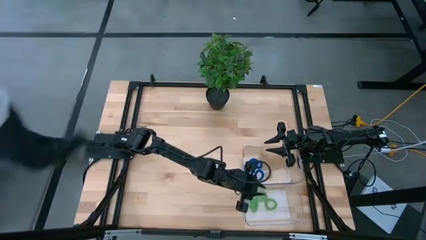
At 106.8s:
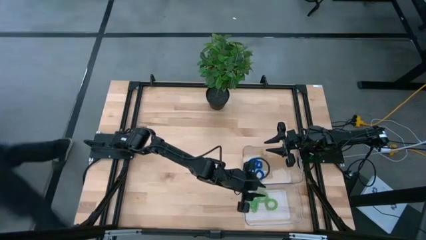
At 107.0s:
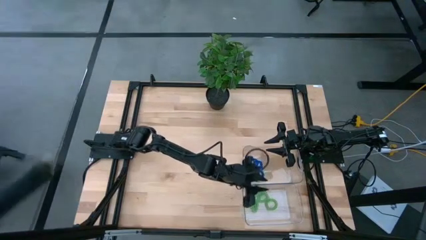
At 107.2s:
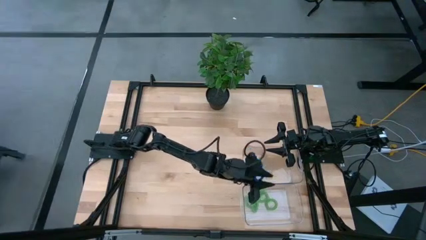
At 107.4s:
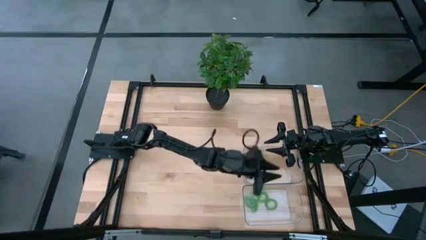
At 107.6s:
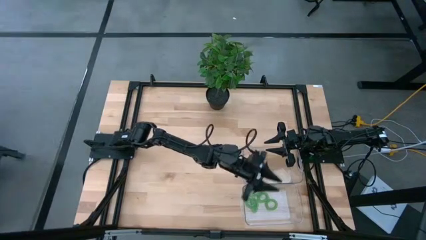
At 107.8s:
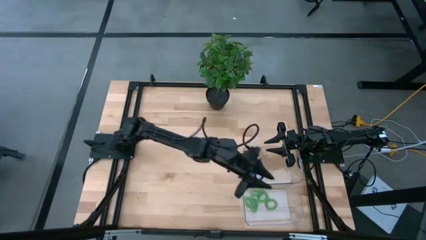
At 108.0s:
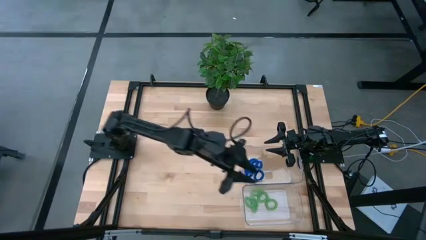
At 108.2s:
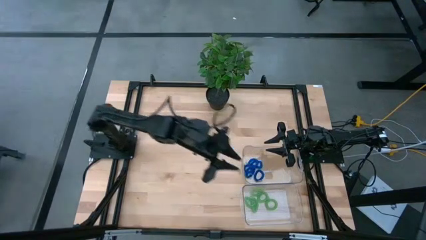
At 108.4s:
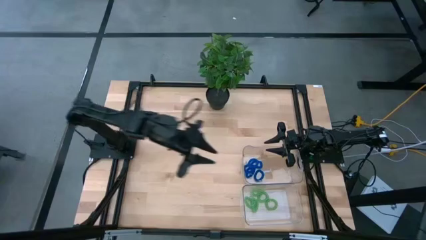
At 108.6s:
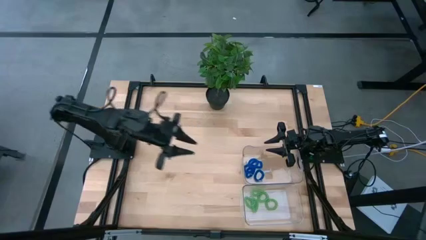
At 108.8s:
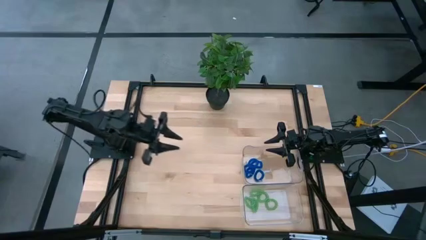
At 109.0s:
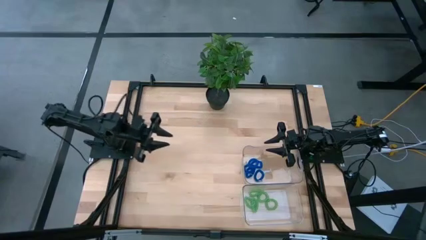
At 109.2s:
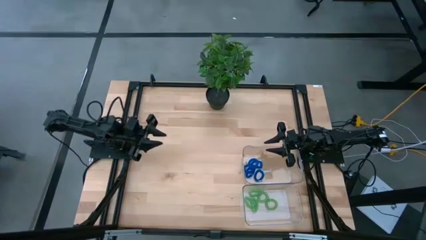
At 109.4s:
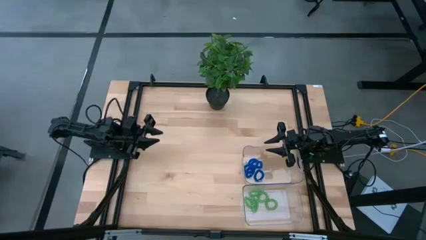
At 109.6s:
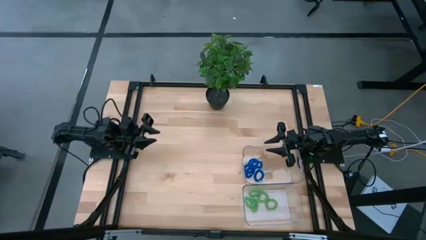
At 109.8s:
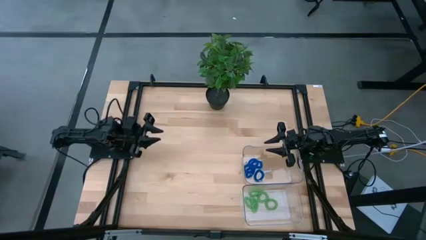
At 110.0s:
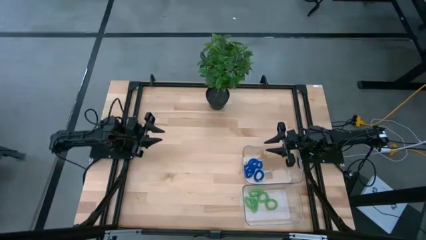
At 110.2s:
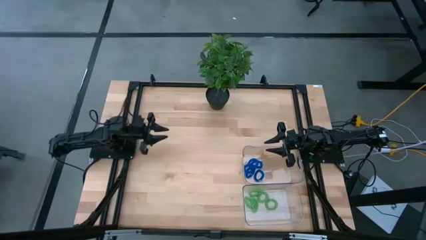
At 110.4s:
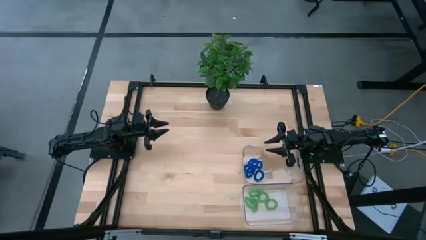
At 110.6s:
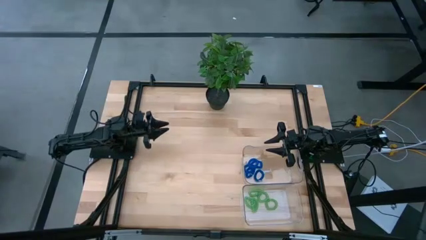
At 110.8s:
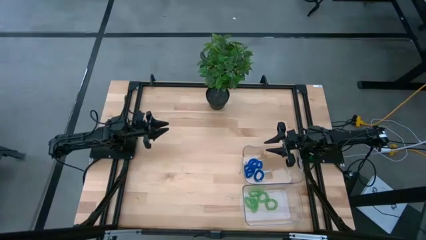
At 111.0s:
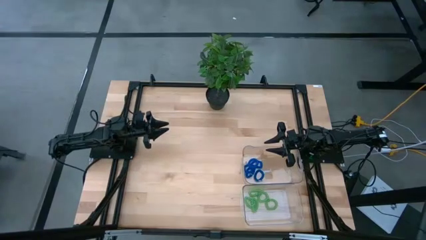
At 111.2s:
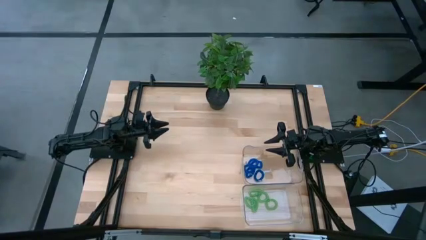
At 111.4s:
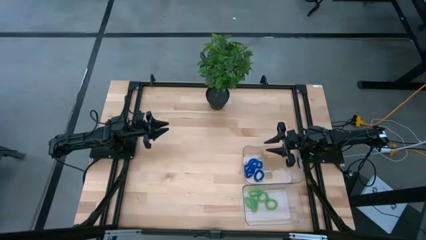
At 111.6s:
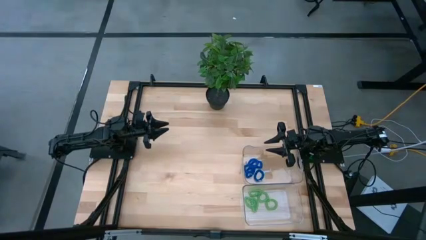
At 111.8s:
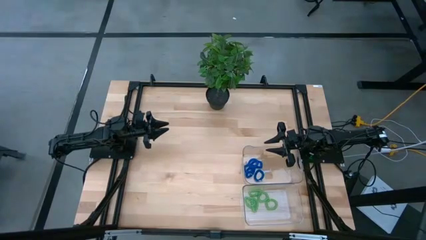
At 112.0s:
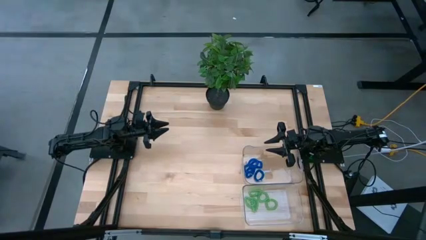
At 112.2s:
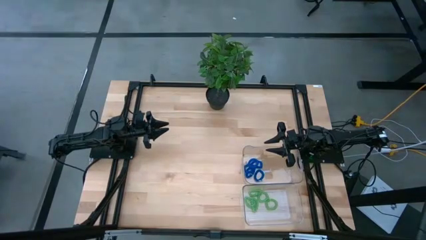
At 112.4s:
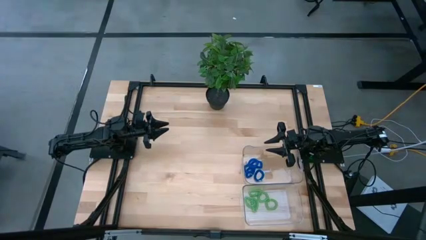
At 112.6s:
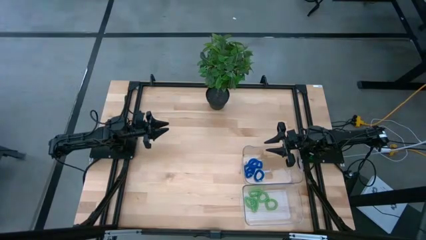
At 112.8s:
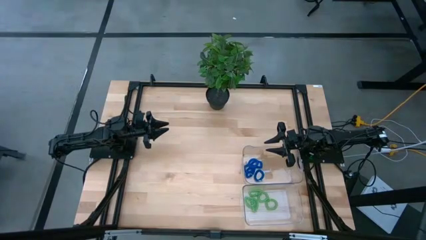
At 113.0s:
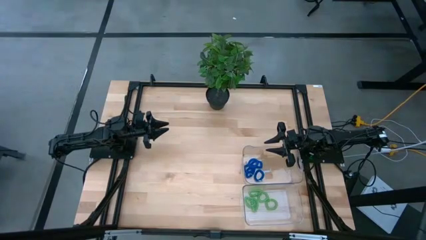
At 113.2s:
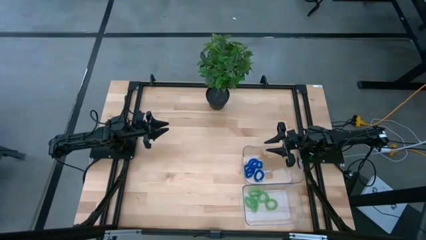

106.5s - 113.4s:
Task: Sort spring keychains
Return to Home Position

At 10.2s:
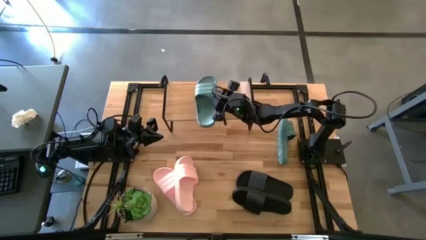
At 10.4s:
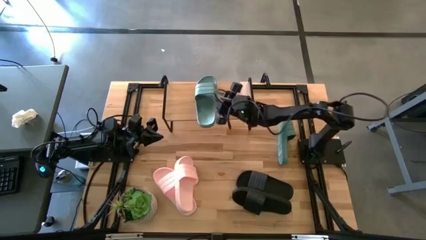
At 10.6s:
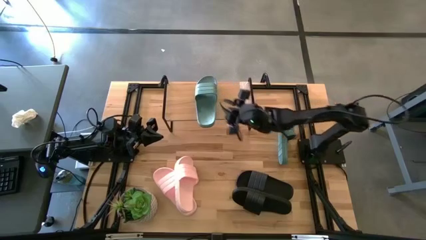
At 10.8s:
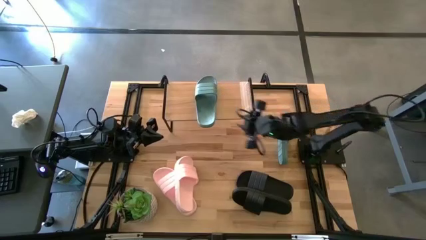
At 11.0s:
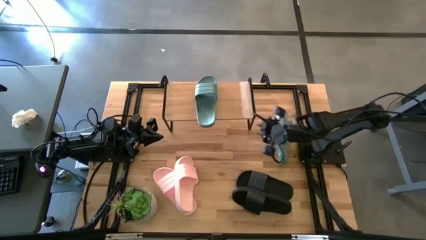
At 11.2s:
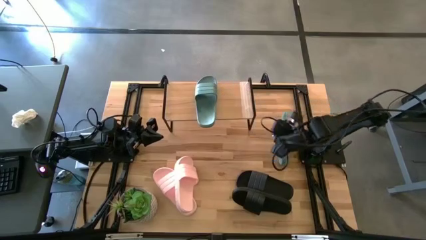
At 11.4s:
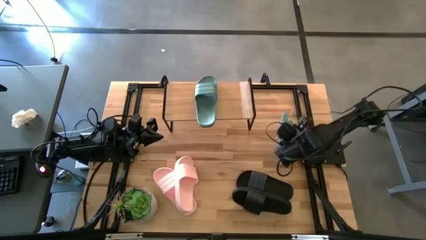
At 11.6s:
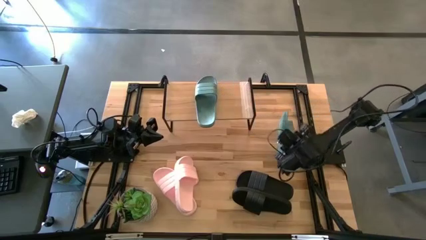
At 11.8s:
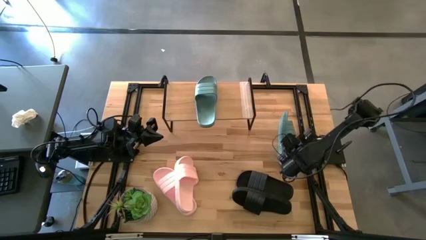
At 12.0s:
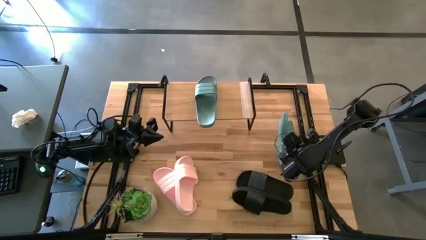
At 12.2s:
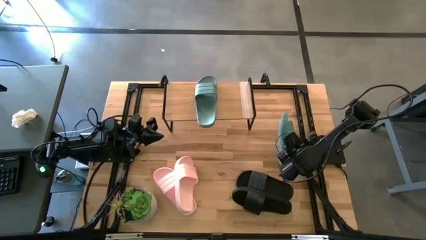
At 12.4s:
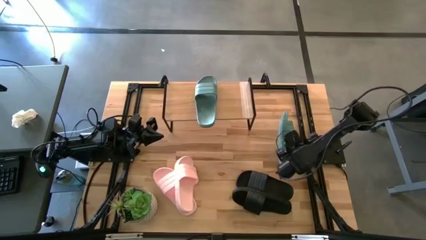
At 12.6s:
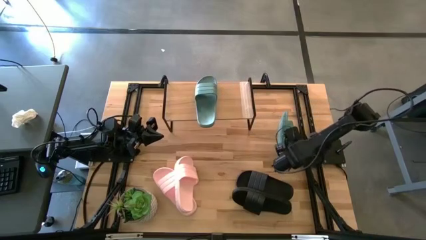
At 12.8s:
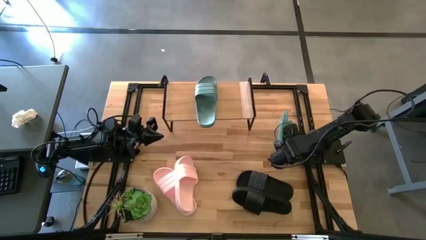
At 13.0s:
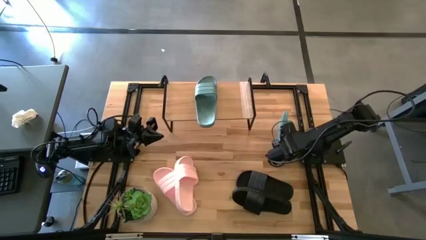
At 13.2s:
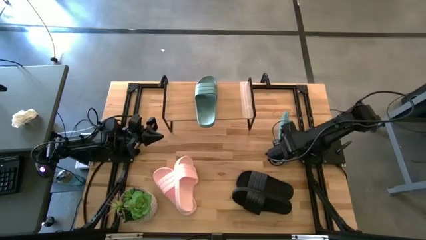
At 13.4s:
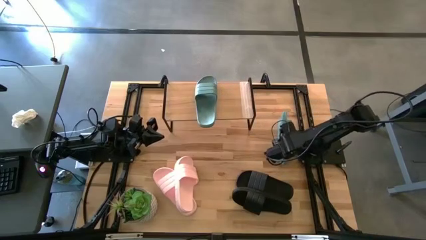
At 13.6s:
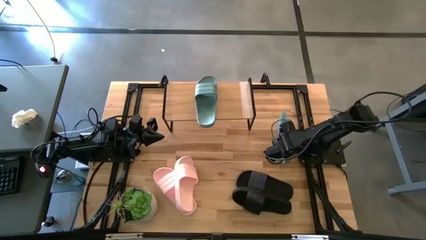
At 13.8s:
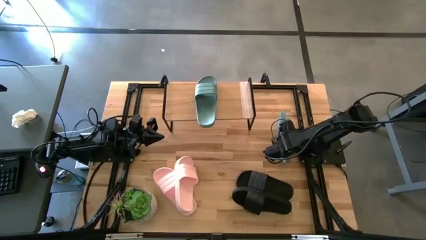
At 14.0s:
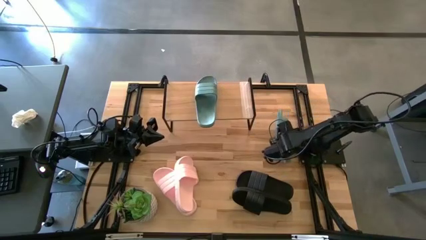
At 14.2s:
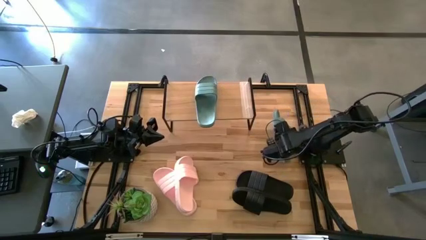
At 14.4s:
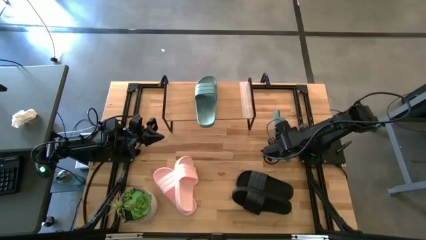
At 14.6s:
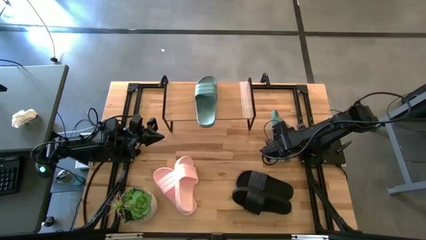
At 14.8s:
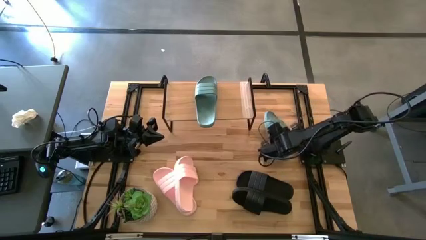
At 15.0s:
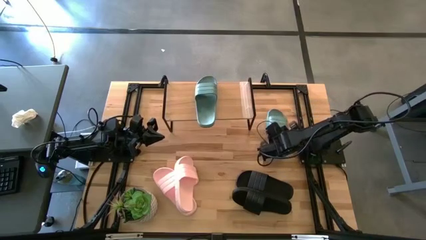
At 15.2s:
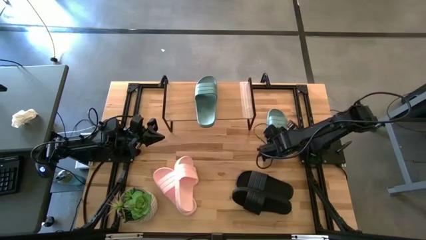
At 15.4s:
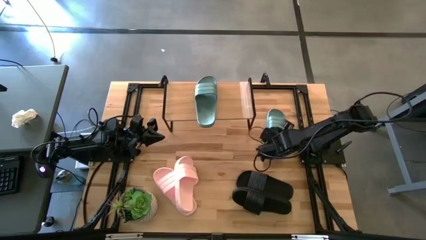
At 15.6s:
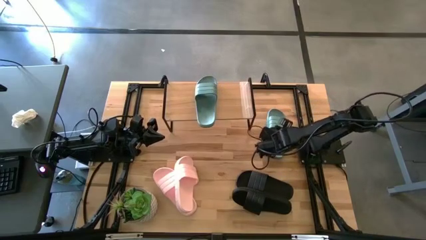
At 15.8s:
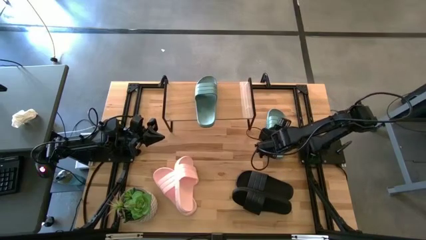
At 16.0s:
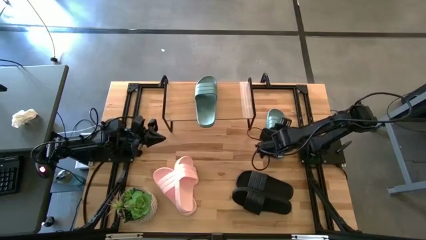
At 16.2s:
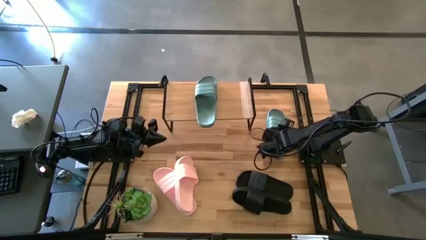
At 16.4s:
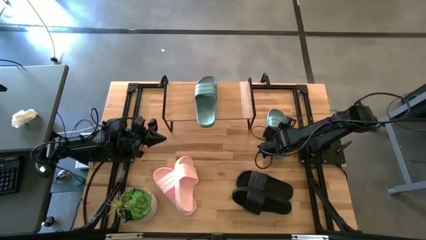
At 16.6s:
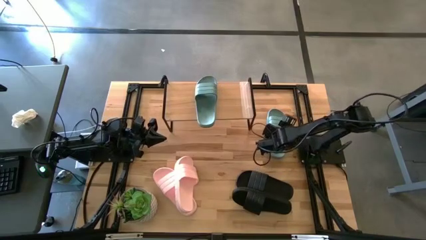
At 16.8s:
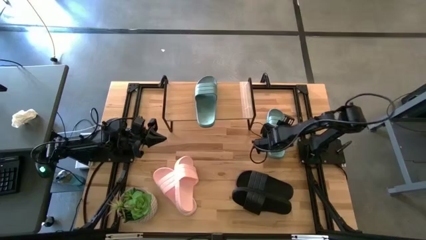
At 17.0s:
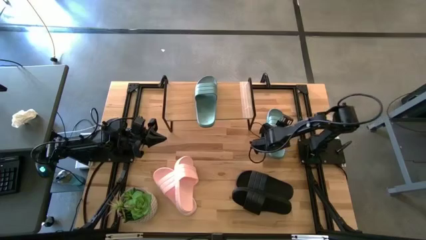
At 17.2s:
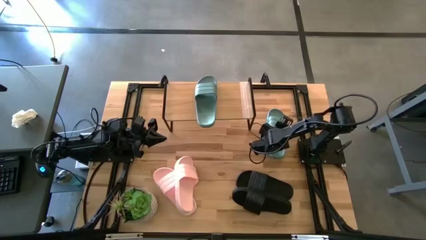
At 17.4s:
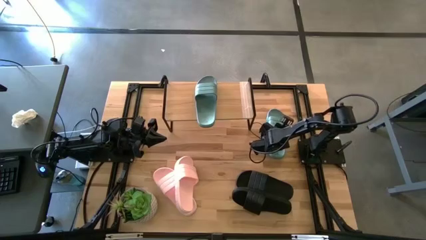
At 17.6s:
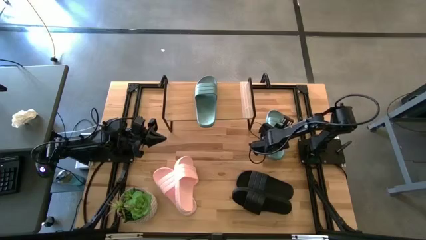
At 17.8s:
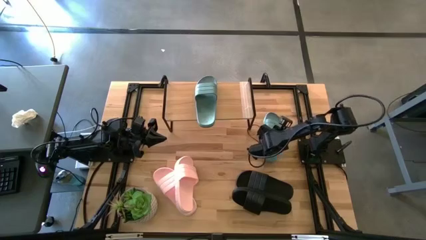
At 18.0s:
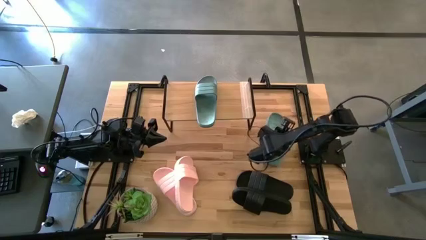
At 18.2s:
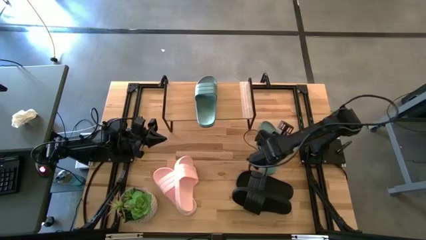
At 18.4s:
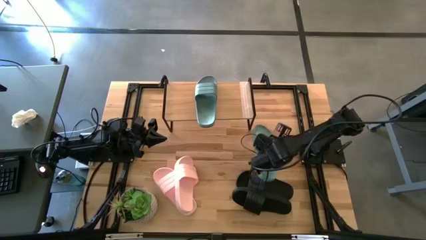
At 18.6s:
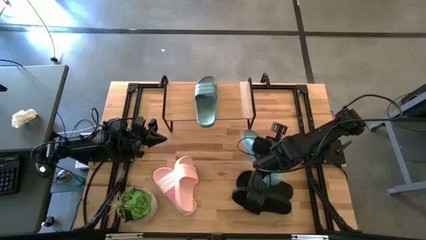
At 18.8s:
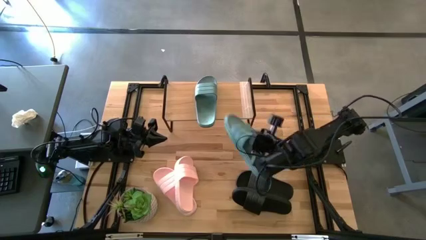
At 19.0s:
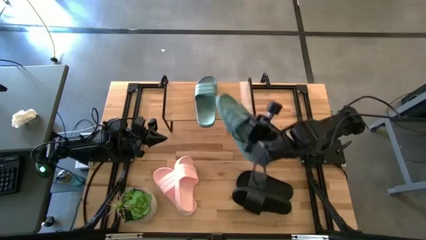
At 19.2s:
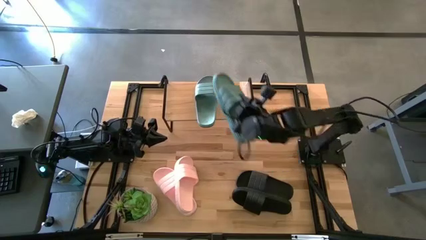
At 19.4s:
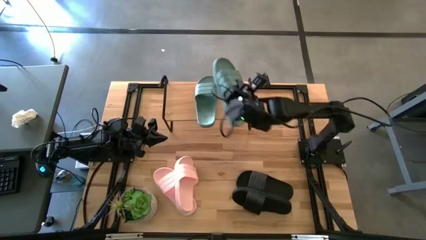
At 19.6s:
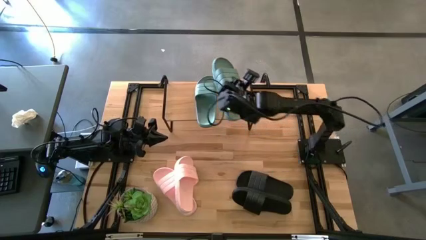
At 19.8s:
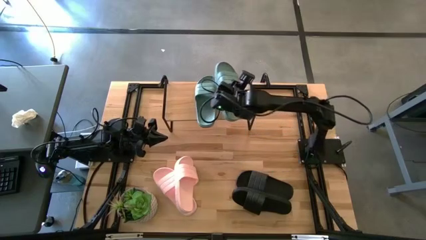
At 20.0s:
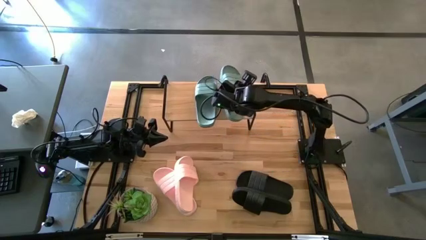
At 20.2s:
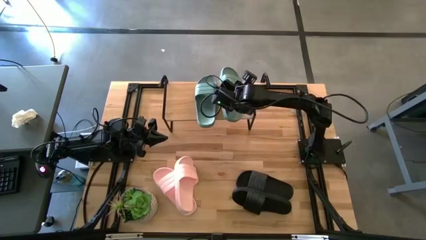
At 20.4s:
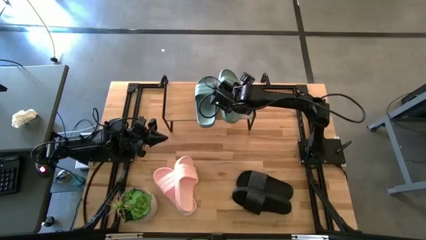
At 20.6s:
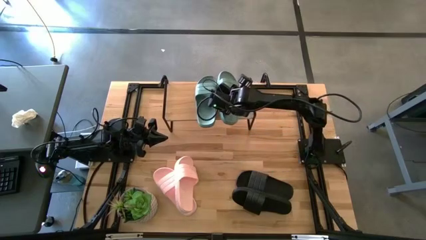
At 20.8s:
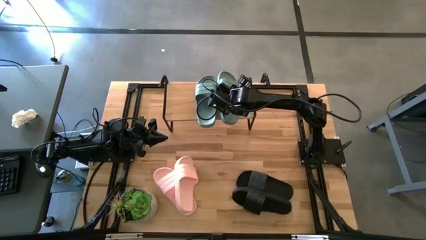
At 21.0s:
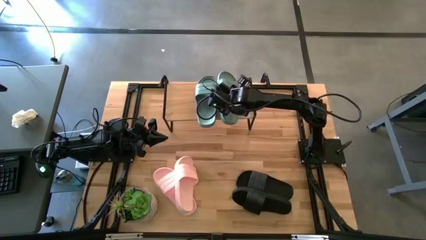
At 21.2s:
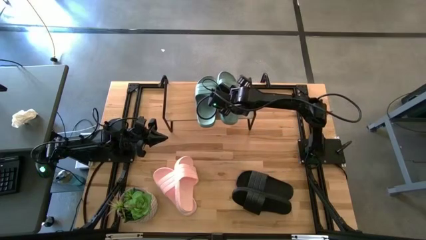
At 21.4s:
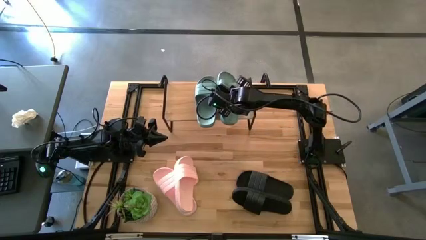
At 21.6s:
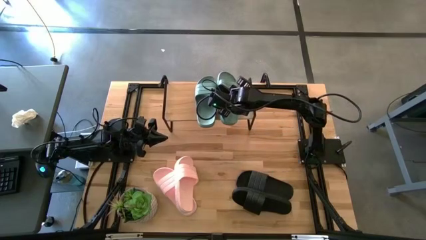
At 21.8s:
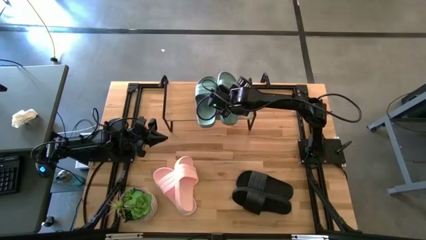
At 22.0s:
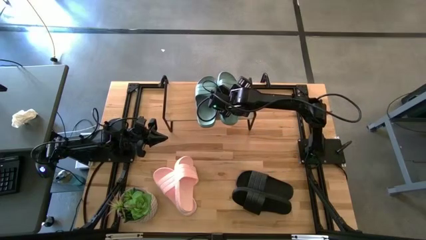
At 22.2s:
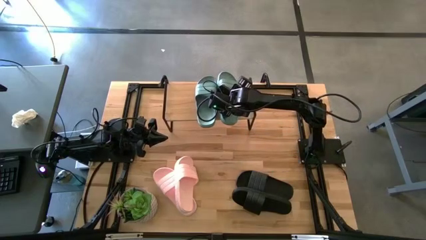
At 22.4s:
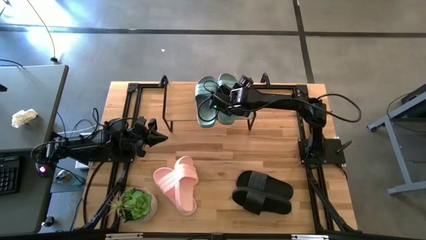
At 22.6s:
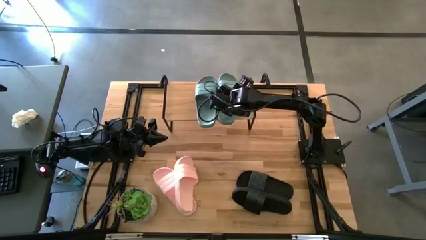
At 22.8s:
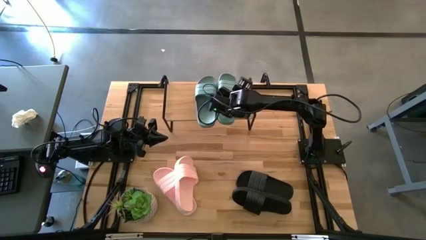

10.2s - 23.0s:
Task: Pick and place slides into the shelf
Put the green slipper on the shelf
